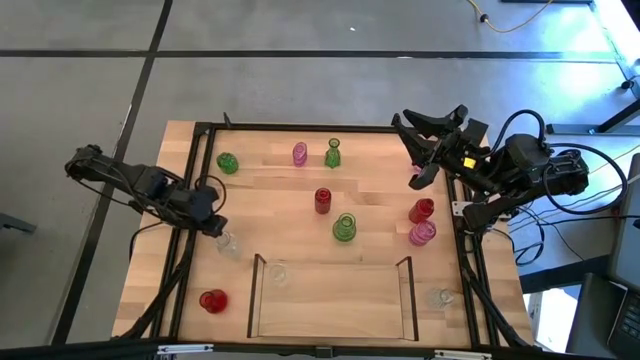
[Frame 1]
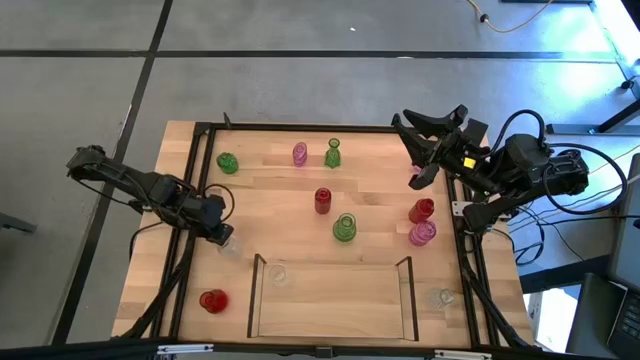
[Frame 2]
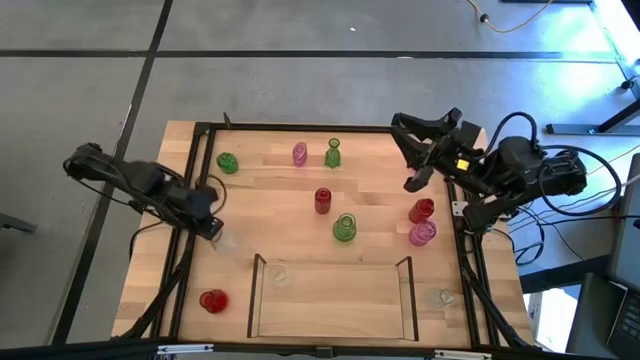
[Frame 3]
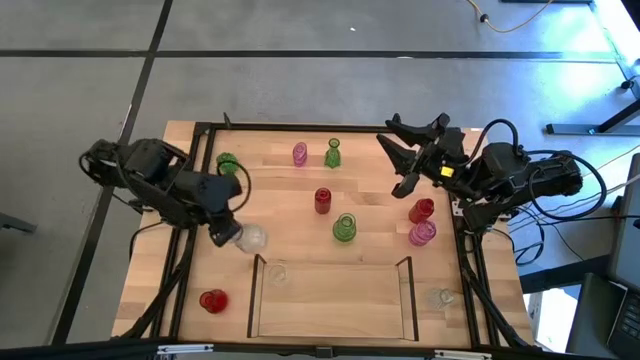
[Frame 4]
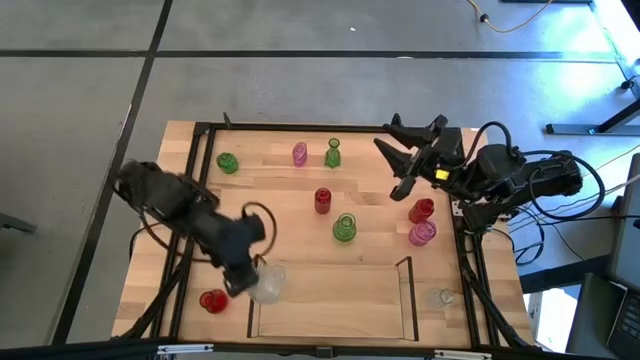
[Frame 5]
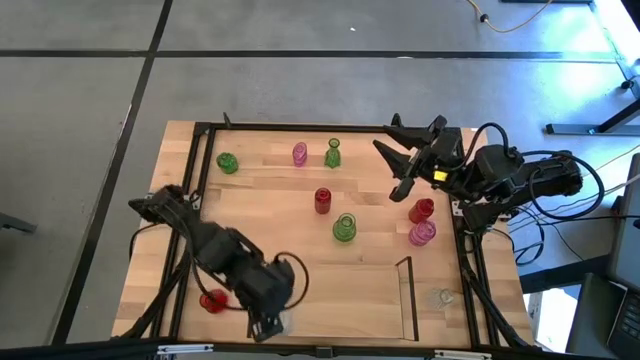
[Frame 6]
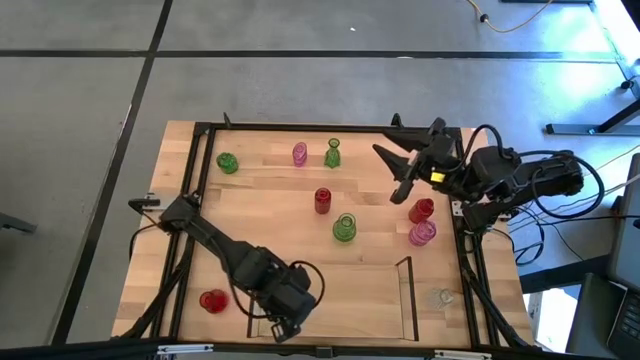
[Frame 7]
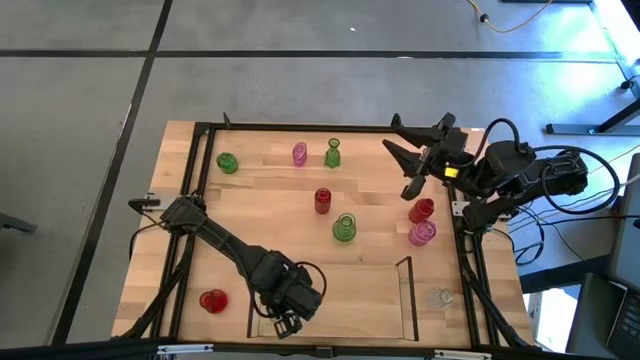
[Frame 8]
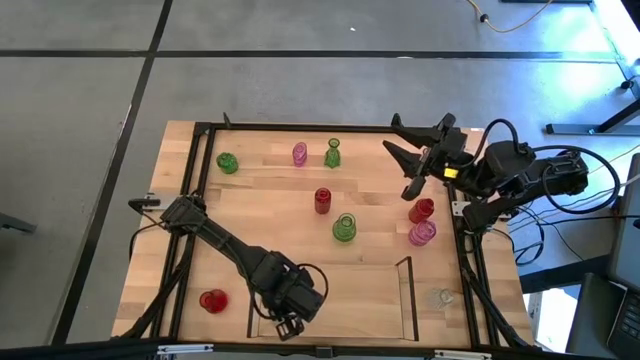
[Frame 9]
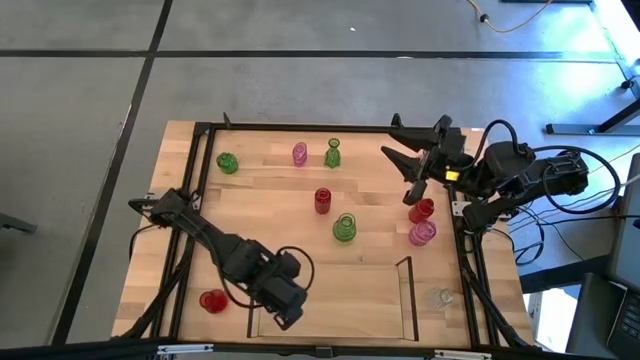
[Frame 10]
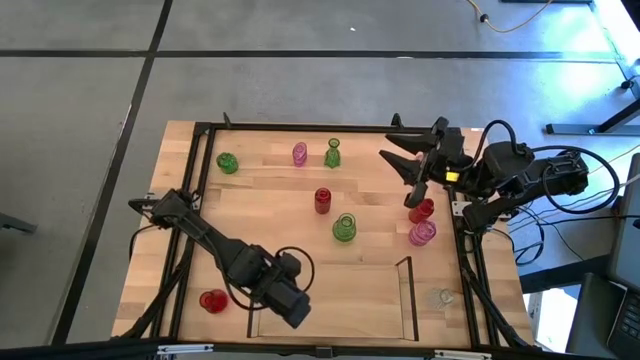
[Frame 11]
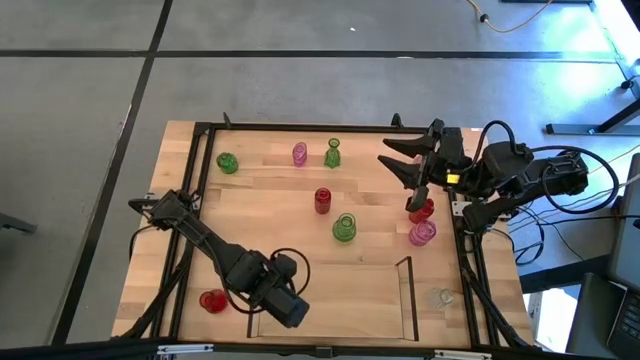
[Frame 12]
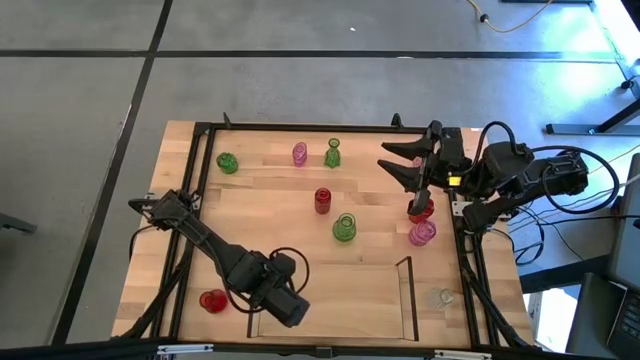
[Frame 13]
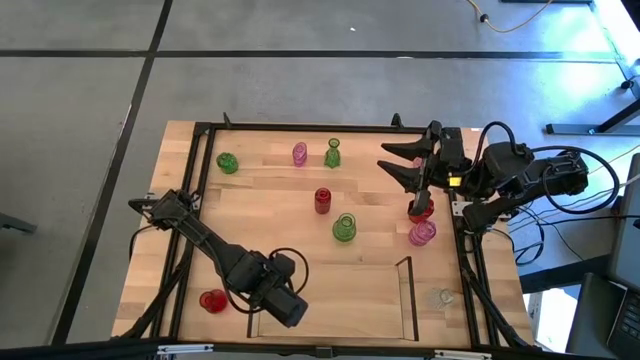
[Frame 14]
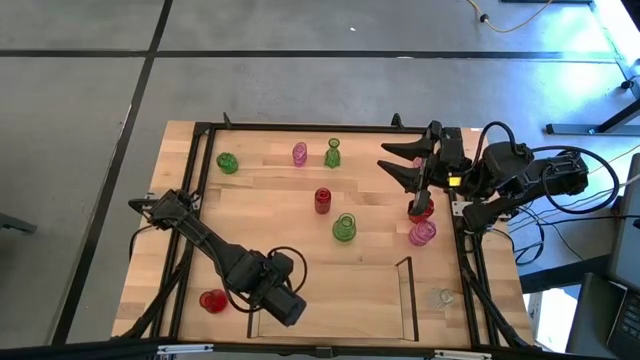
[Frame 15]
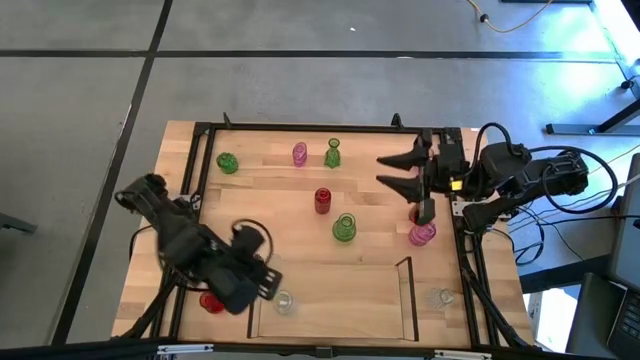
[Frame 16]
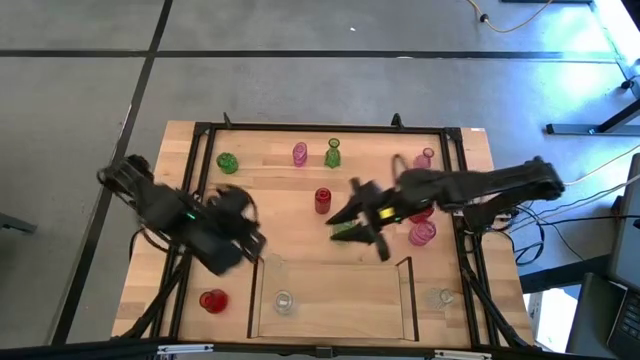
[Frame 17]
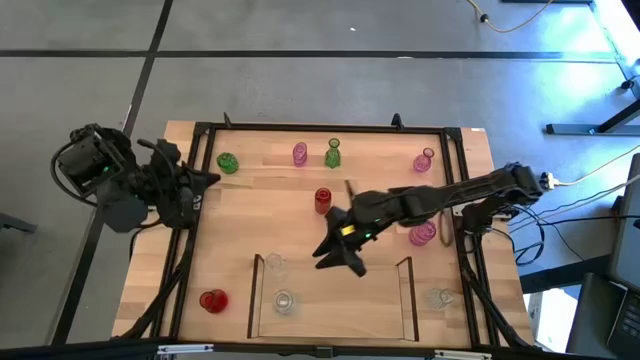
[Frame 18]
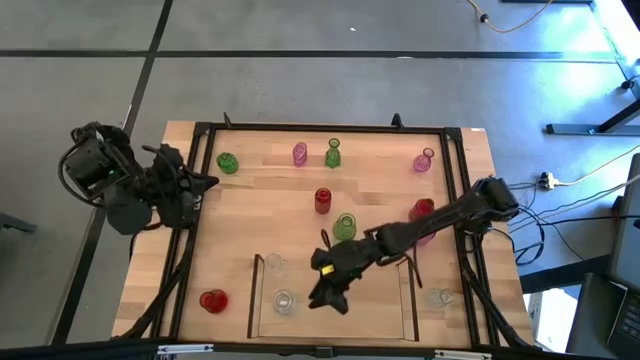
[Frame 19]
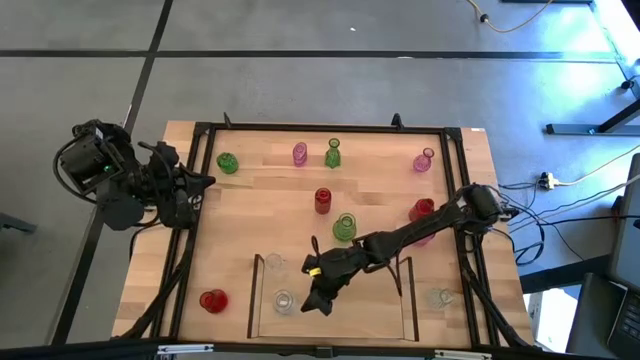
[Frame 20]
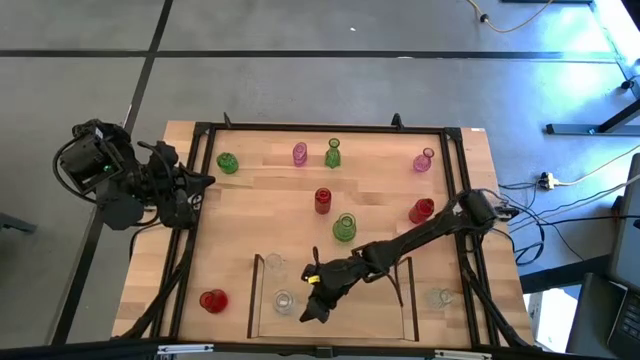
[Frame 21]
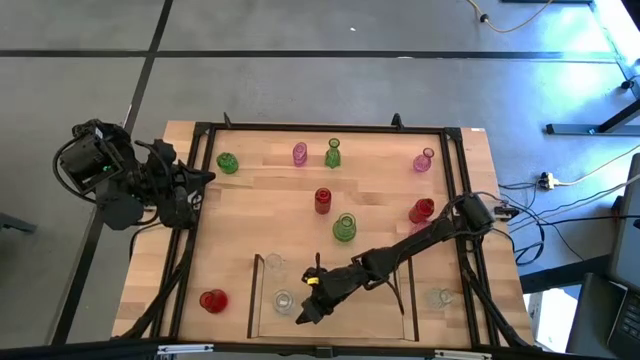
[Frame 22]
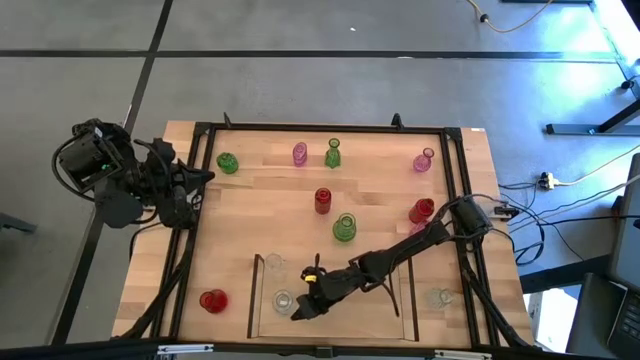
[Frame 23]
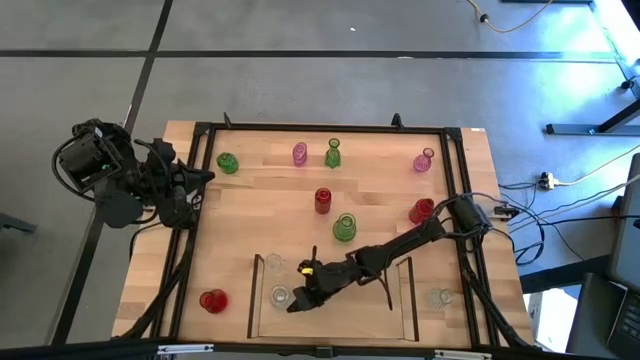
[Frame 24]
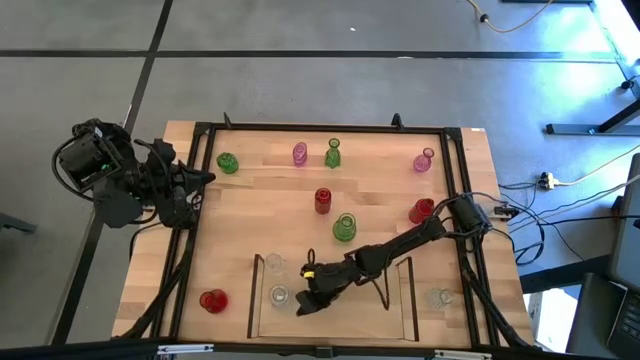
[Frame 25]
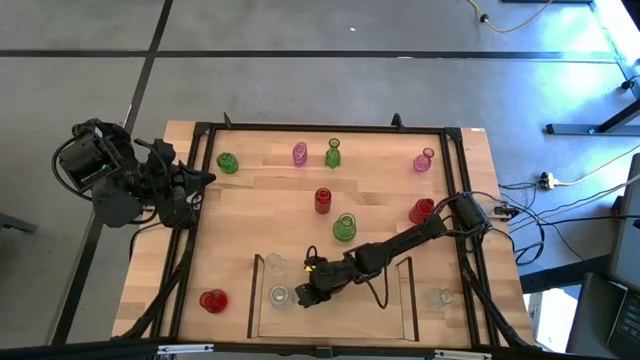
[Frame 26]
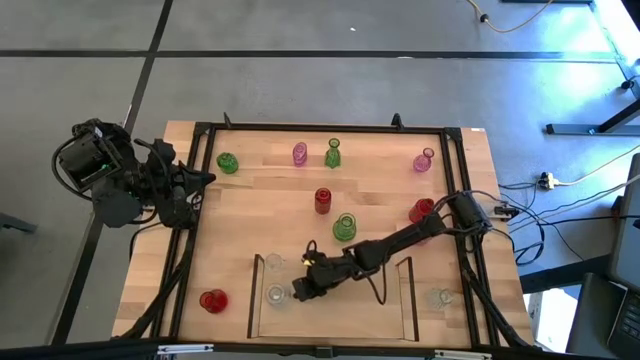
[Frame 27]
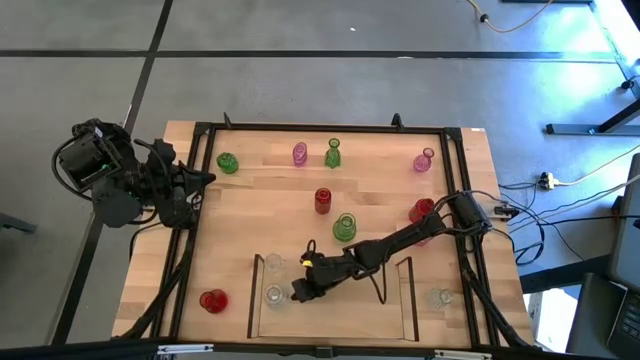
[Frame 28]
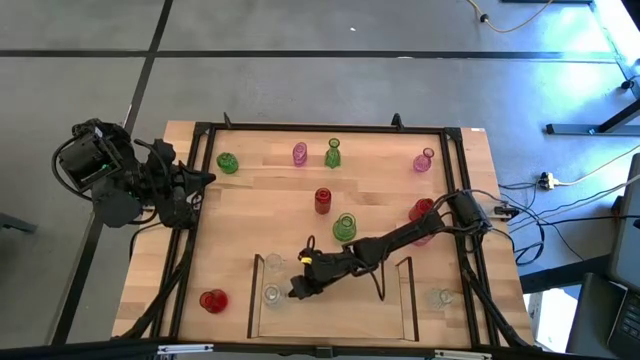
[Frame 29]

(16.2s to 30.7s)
Task: sort vases onto shelf
Put the left transparent vase aligned with the other transparent vases on the shelf

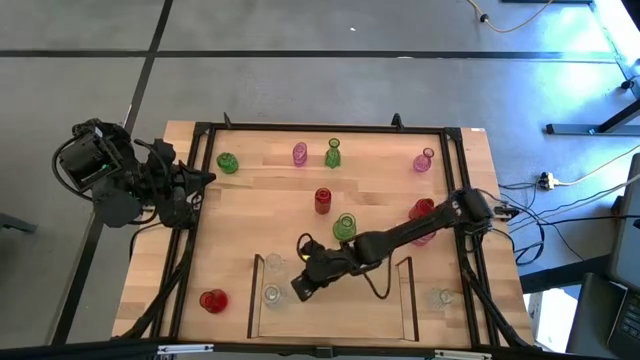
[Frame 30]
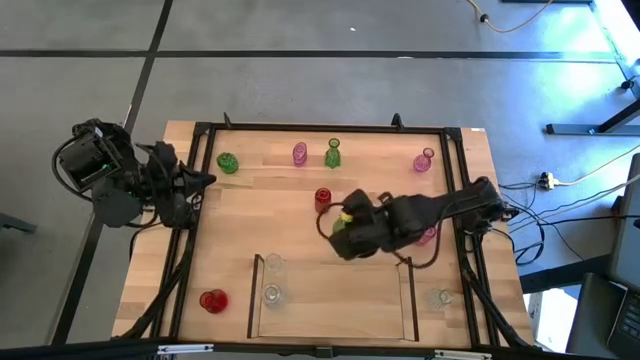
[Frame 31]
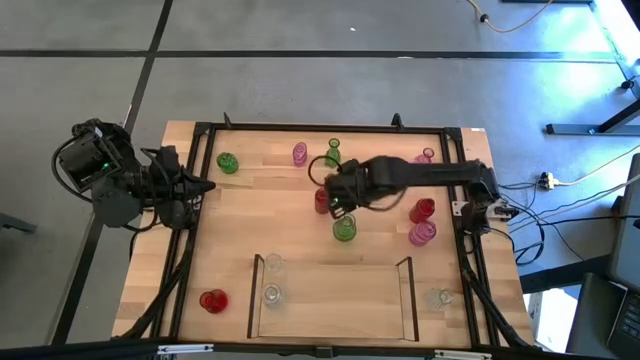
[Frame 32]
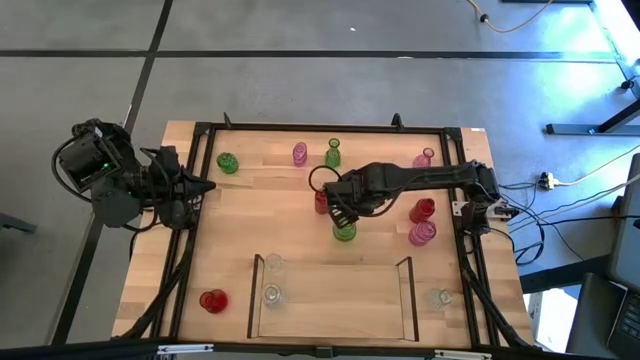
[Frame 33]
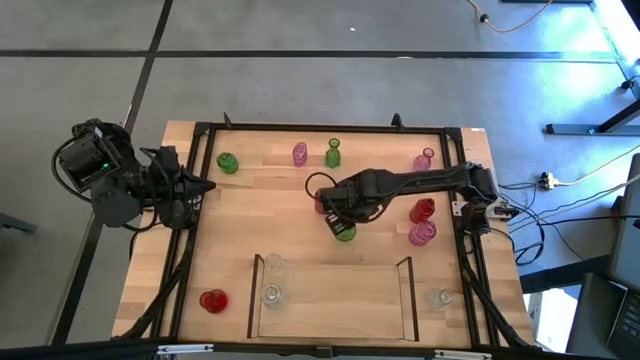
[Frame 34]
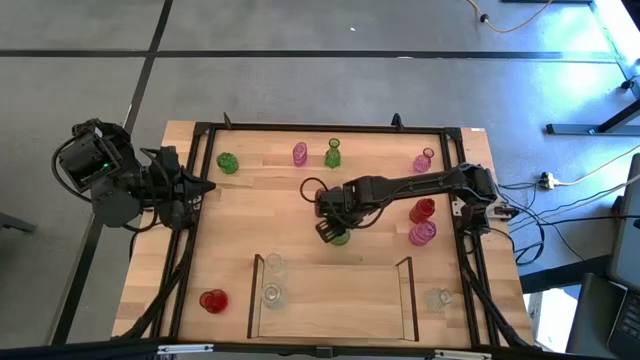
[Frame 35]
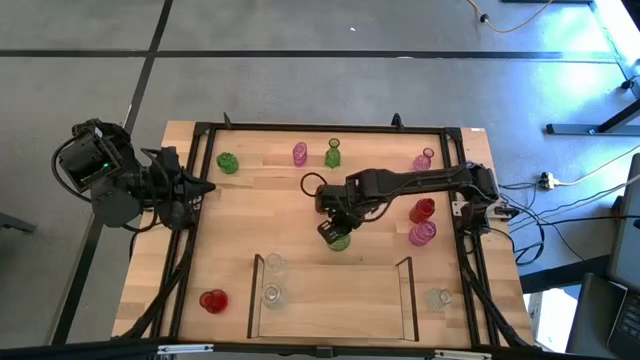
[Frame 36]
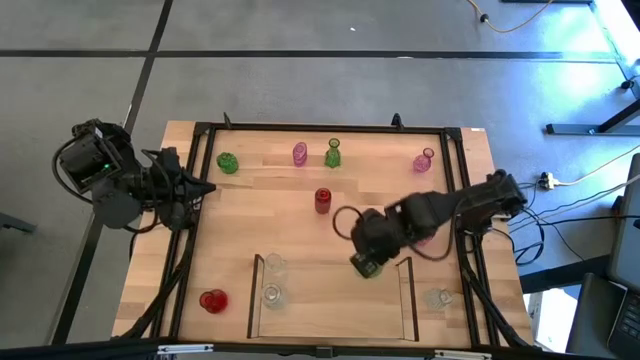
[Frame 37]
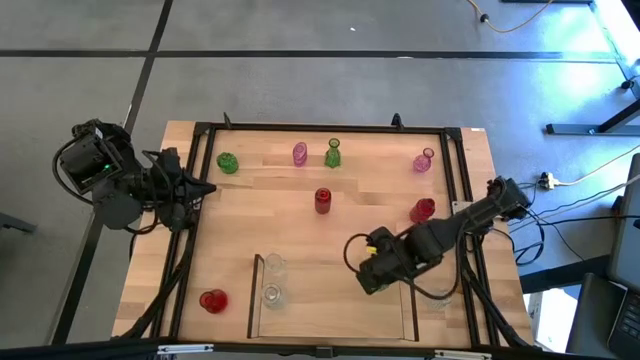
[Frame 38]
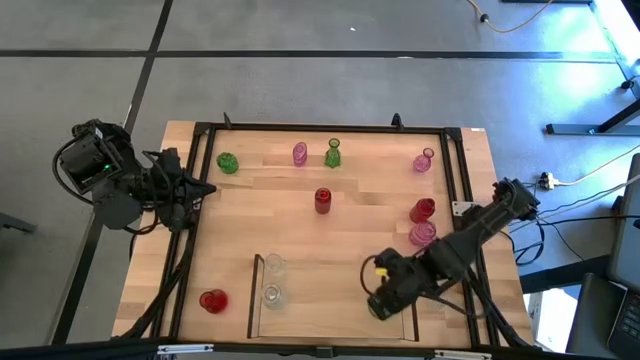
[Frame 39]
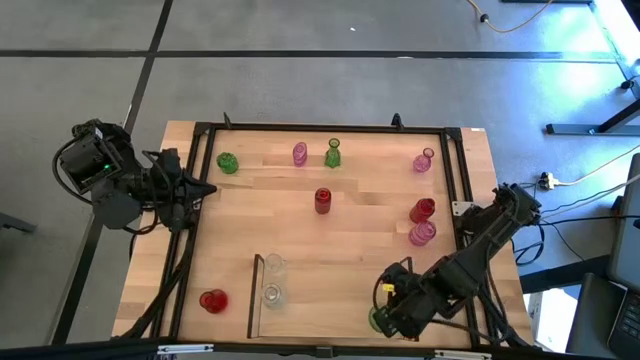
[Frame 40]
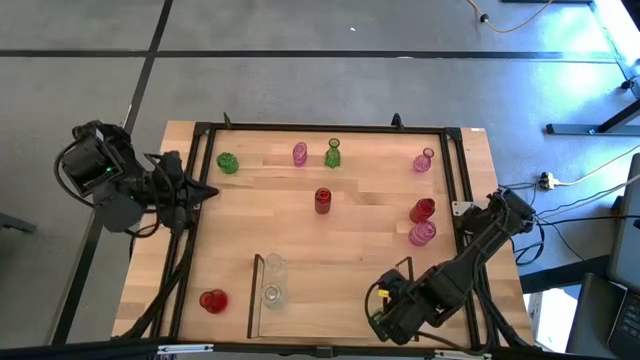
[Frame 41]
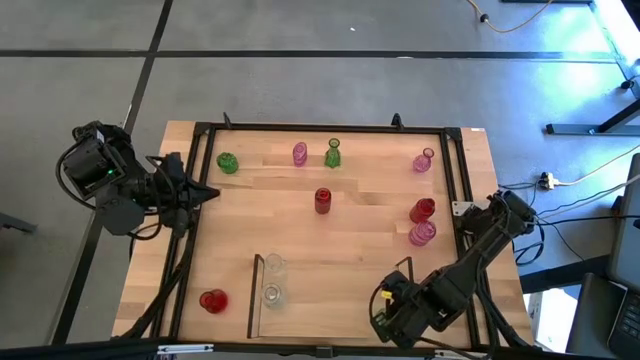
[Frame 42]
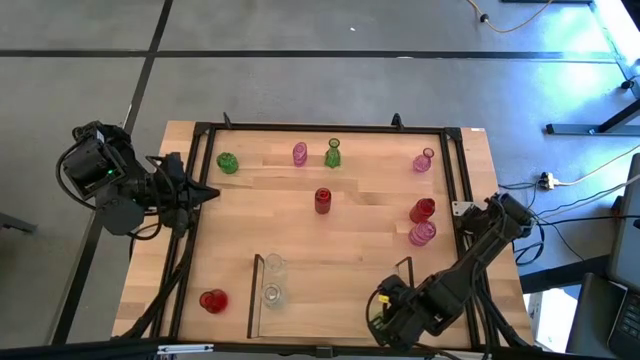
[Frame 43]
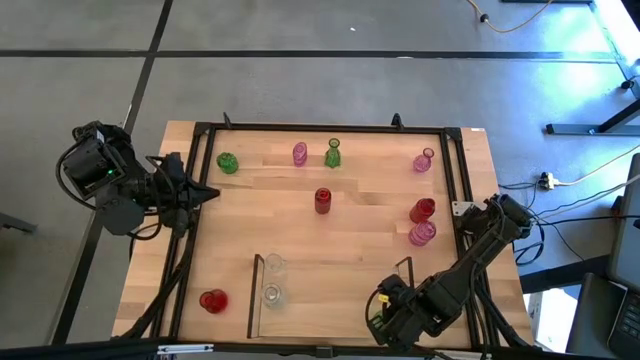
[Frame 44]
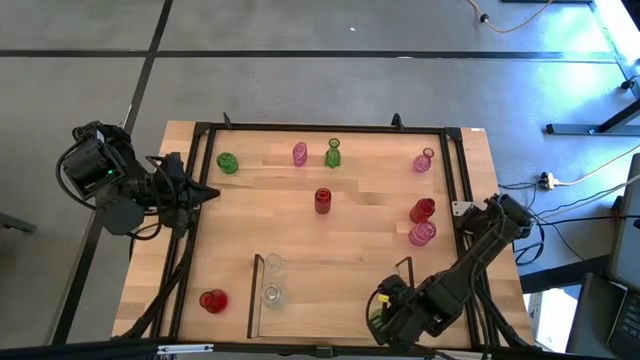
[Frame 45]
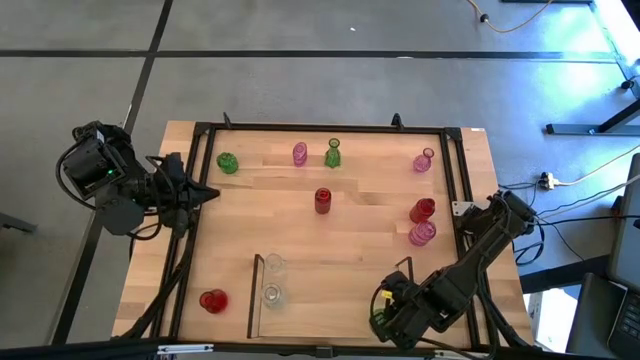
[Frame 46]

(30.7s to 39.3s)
Put the bottom right green vase on the shelf
